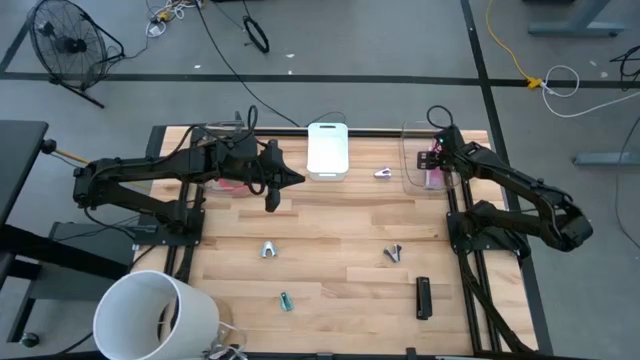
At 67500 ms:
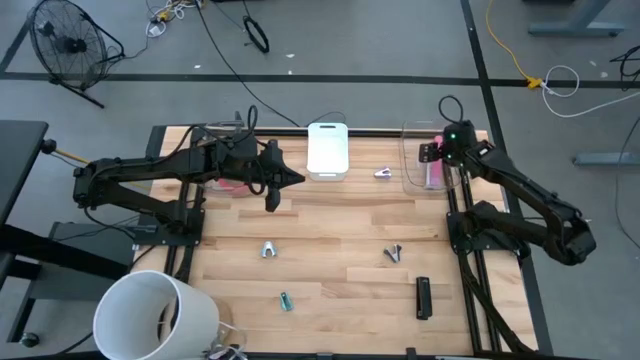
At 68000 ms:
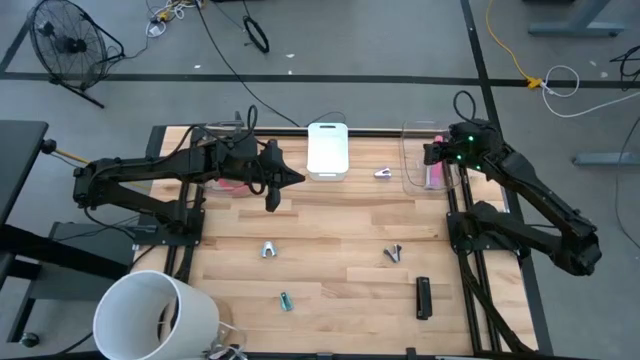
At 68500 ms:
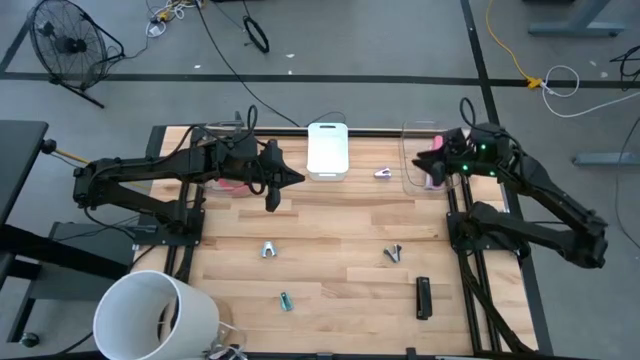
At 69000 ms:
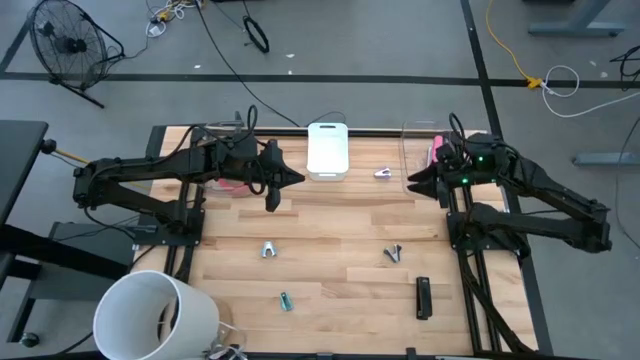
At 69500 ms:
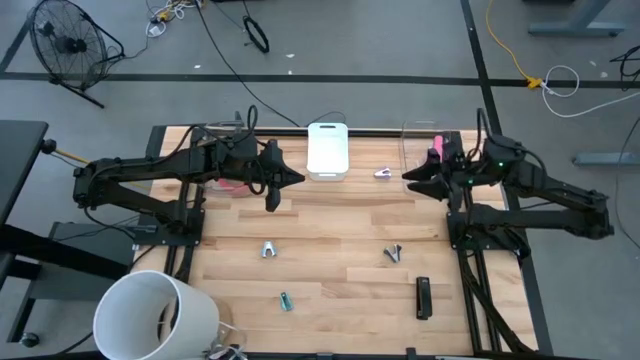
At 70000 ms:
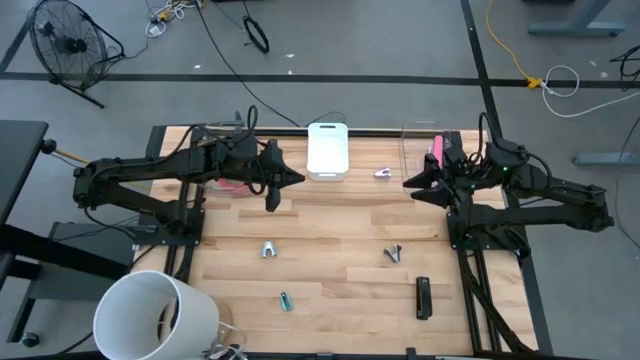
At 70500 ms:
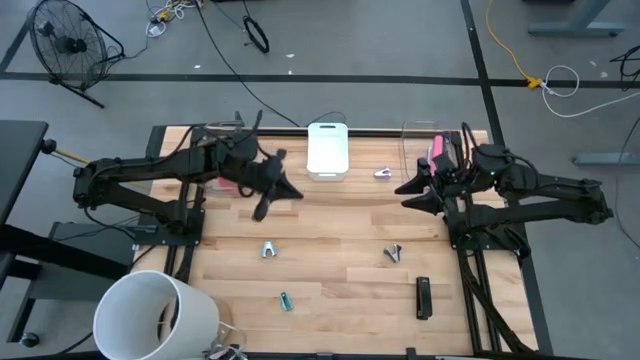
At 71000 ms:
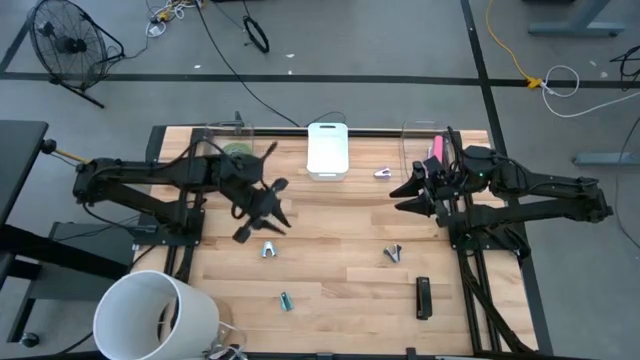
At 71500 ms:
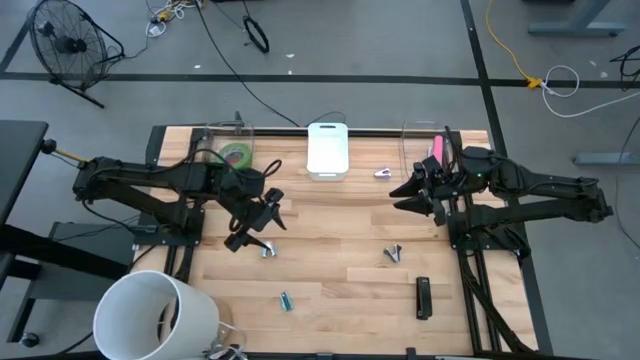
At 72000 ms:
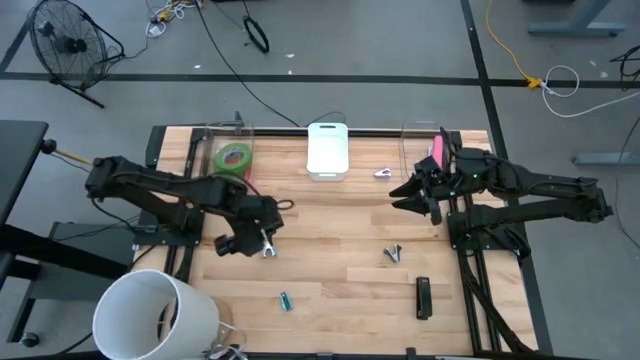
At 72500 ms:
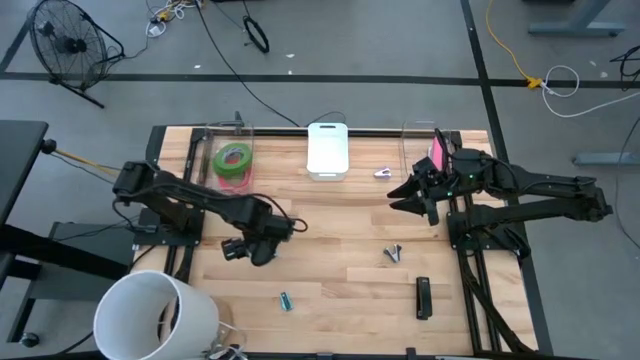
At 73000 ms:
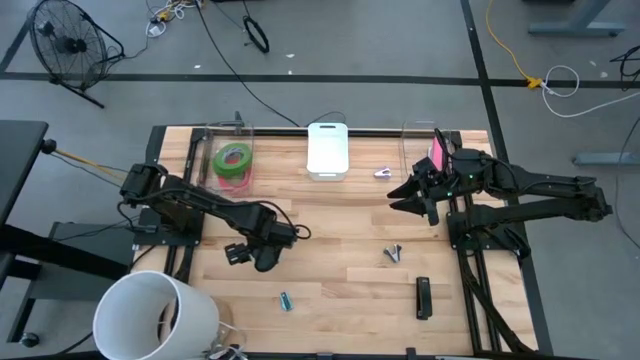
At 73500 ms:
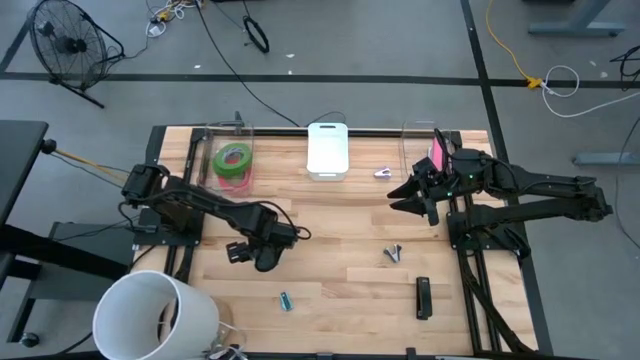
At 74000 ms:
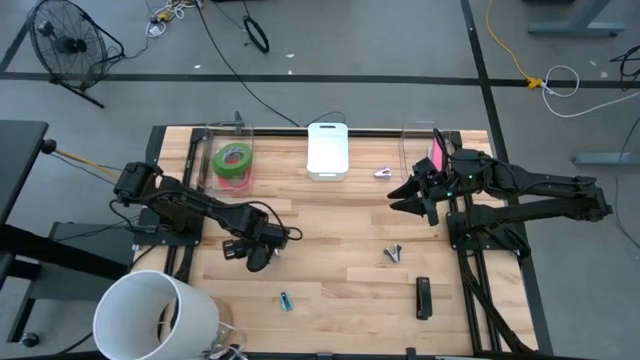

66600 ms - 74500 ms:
Task: Pick and place Stapler, Stapler remover, tape
Put the gray staple remover into the white bin

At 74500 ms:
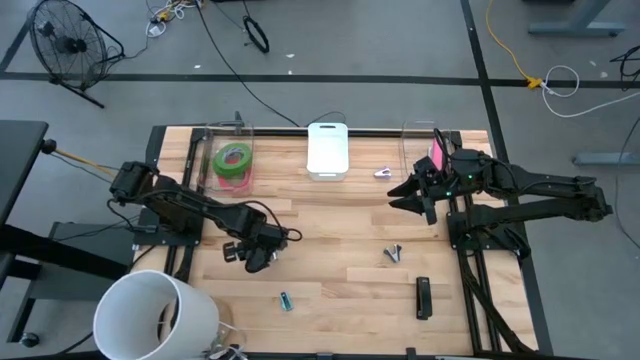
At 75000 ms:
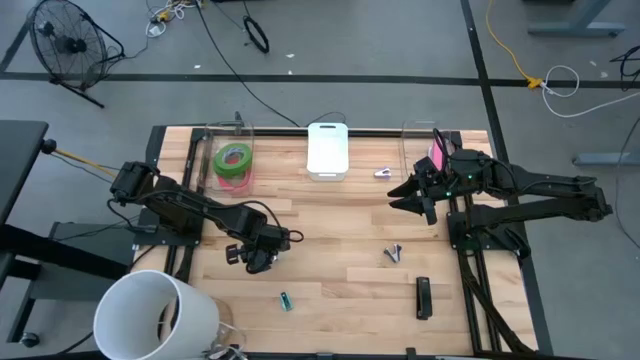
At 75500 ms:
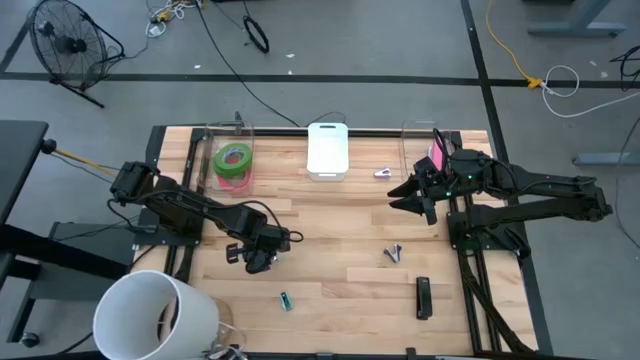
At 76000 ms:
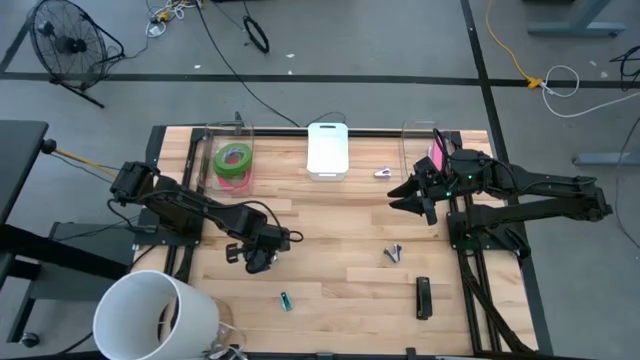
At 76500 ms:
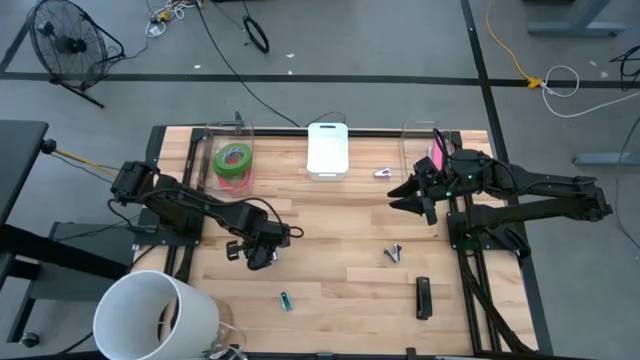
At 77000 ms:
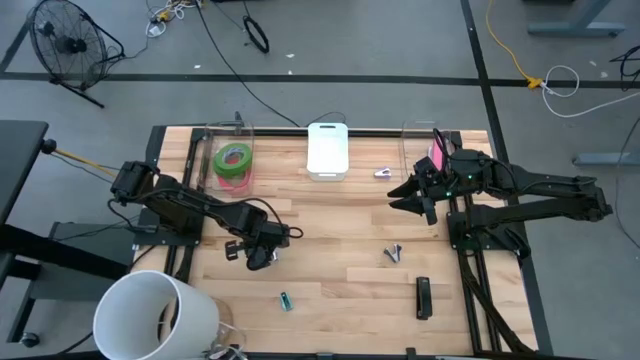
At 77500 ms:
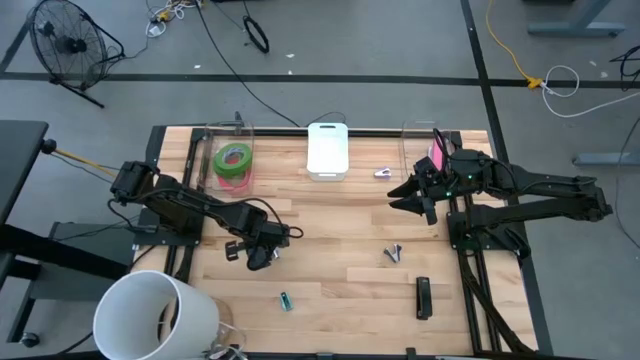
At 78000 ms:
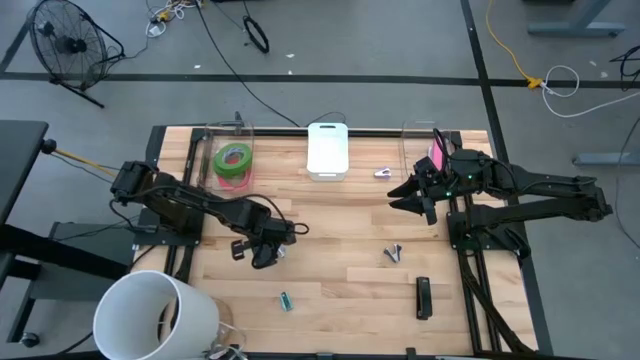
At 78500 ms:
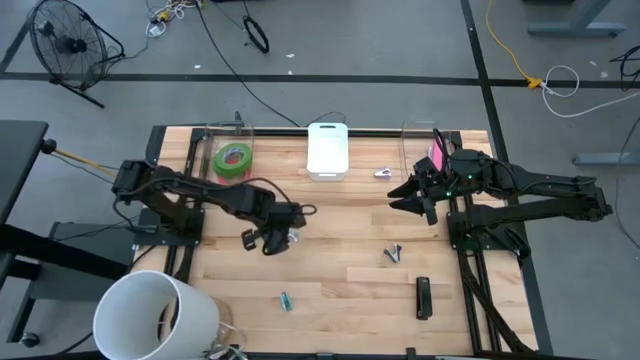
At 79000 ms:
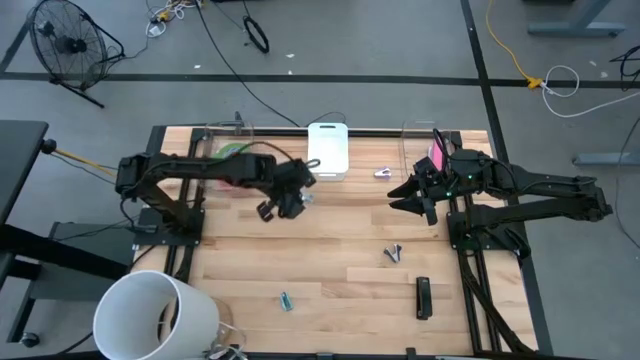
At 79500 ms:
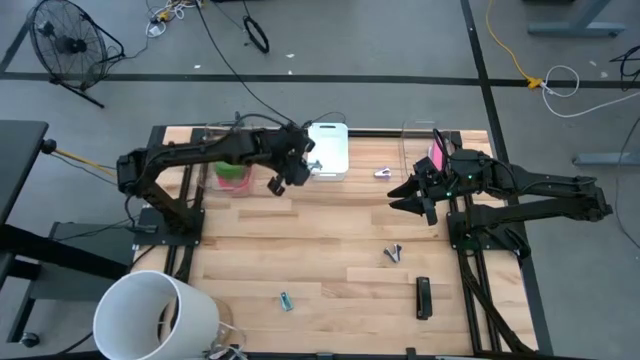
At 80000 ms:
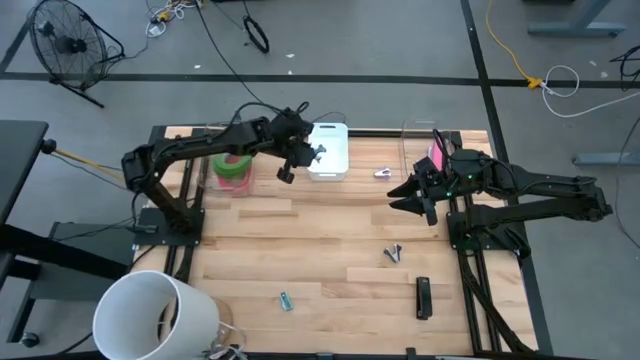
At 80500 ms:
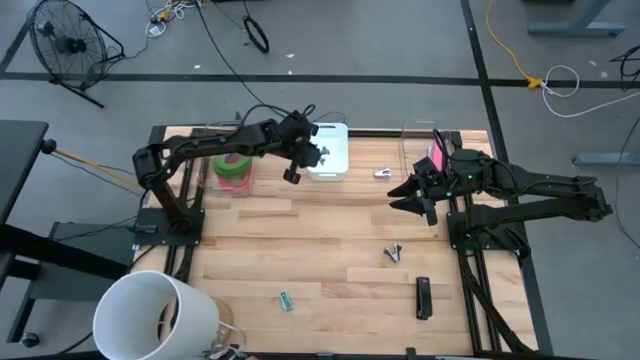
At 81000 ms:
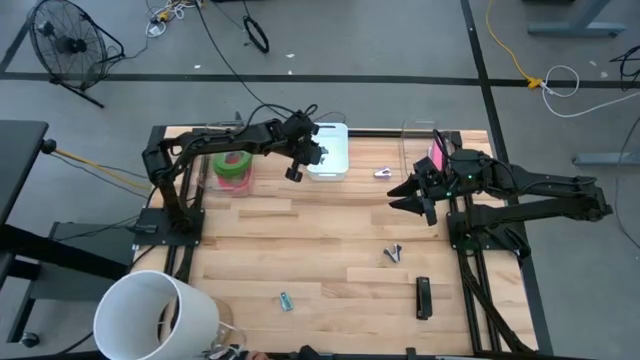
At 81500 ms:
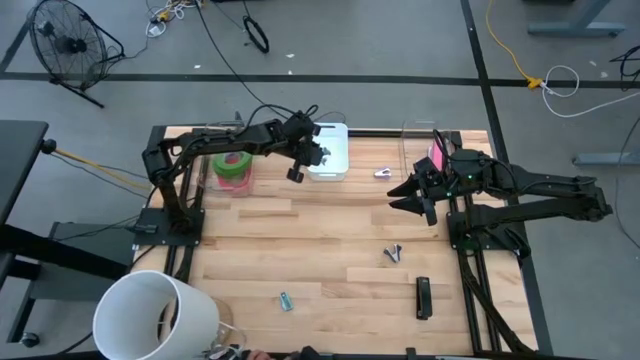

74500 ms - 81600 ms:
Put the gray staple remover into the white bin

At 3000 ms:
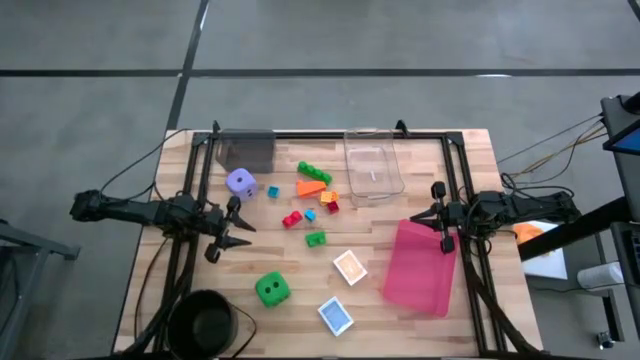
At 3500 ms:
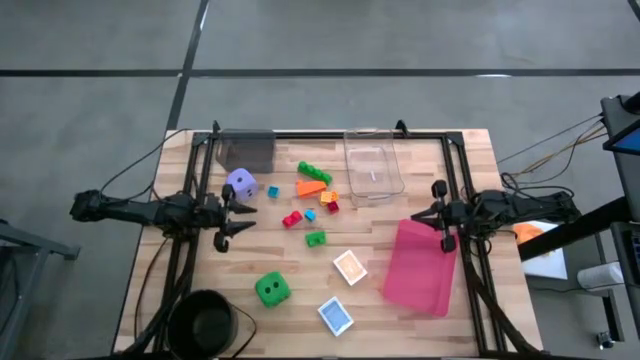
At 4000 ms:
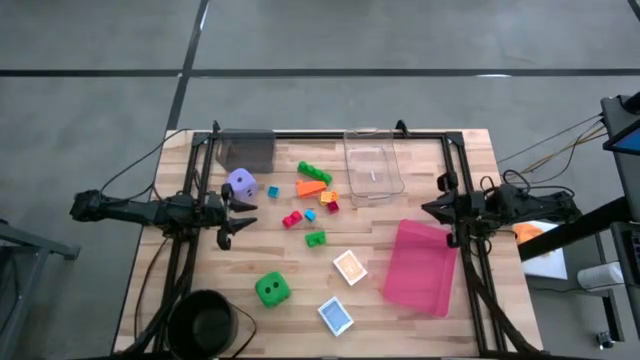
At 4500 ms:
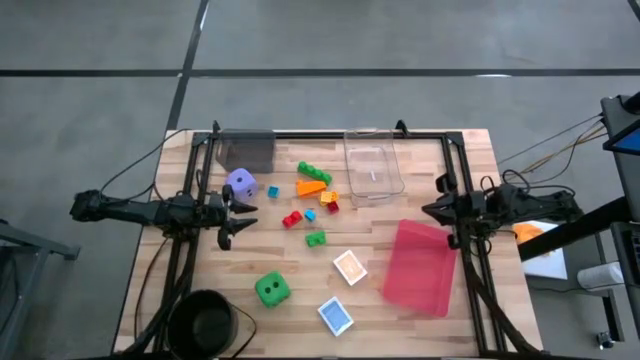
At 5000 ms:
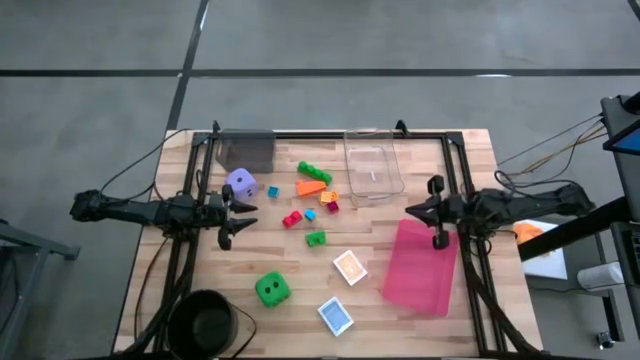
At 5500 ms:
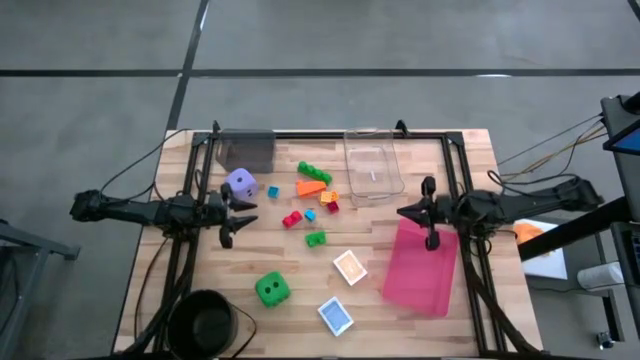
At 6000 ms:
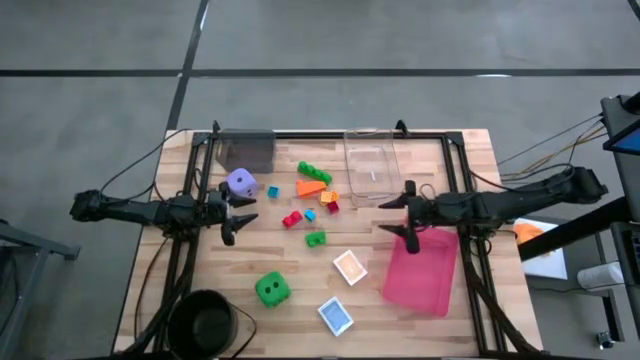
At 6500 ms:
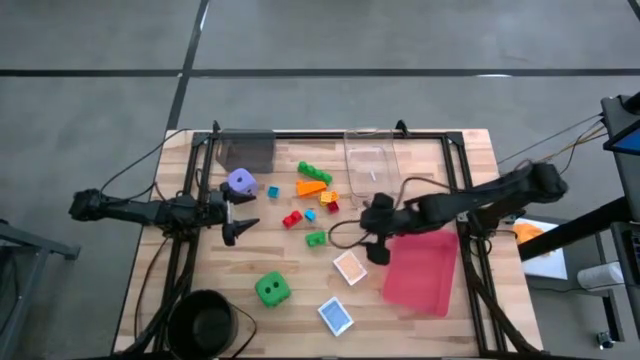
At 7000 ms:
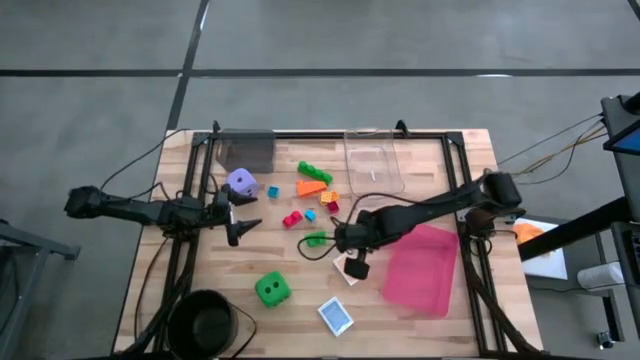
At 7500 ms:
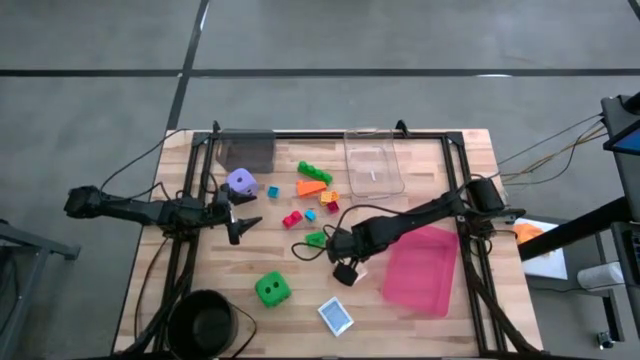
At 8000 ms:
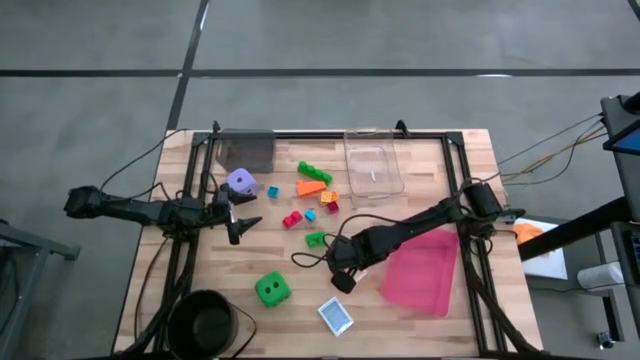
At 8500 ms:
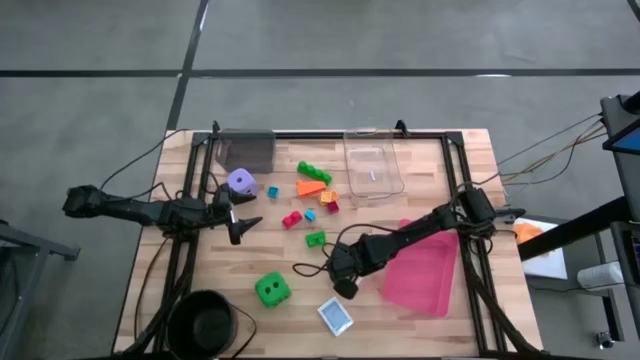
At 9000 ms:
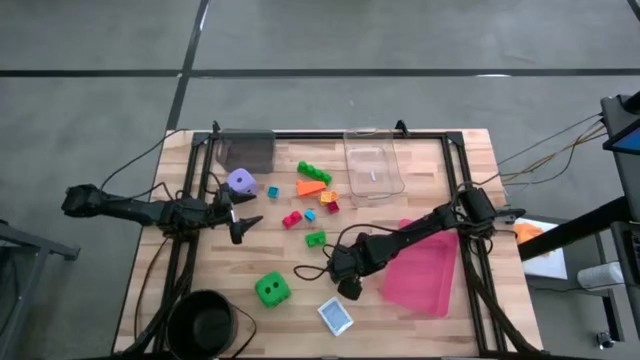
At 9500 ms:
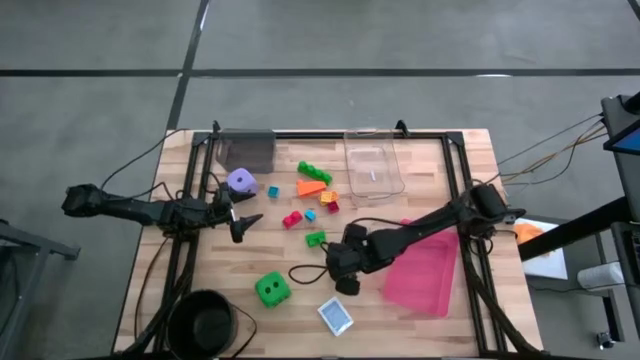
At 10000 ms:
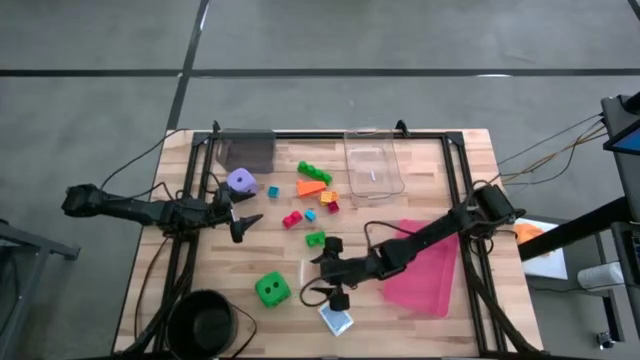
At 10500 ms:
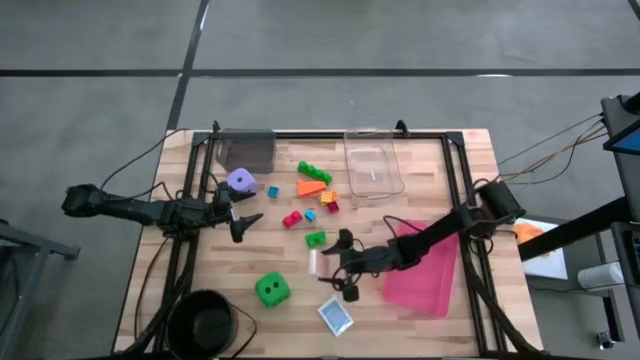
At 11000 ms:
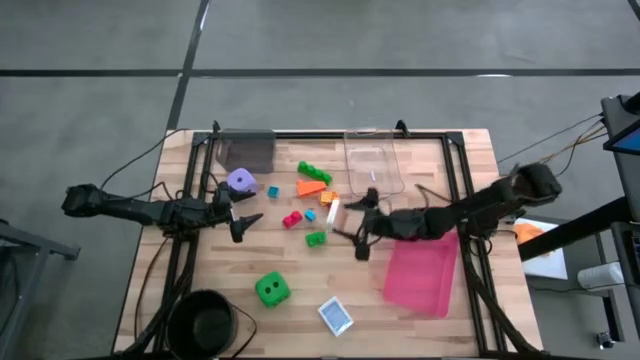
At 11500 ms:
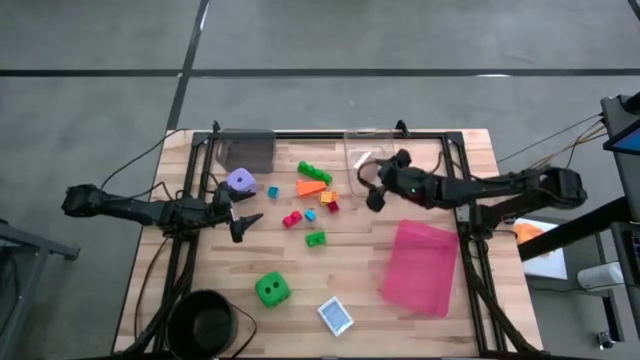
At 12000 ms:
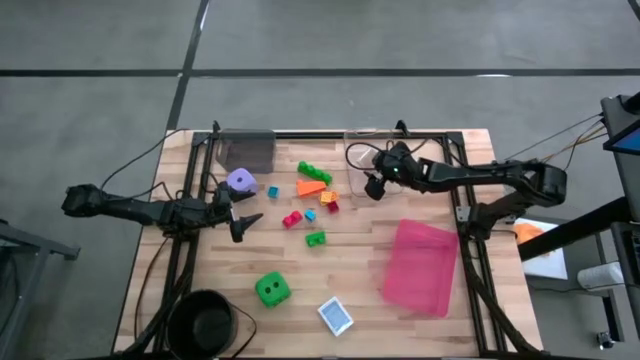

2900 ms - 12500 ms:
Task: Pick & Place Toys
Put the orange deck of cards into the transparent bin
